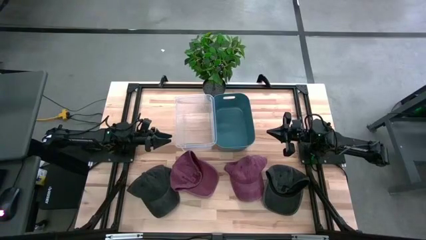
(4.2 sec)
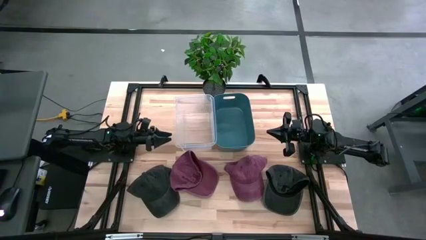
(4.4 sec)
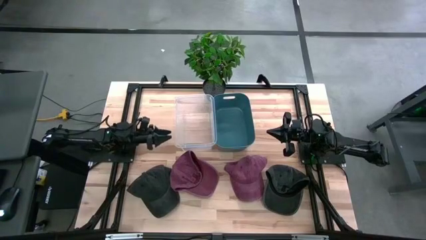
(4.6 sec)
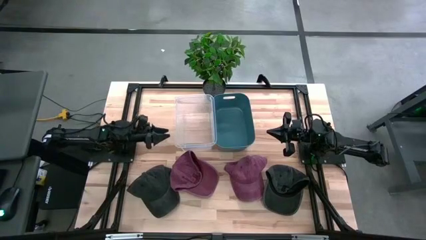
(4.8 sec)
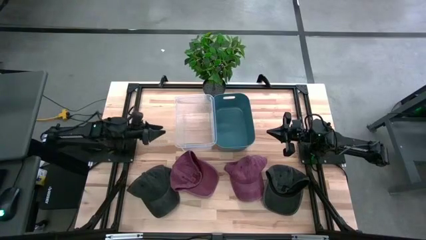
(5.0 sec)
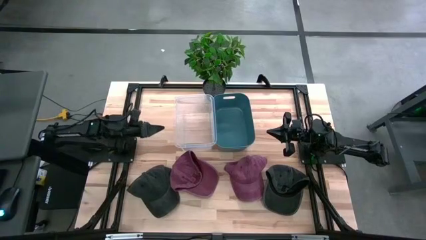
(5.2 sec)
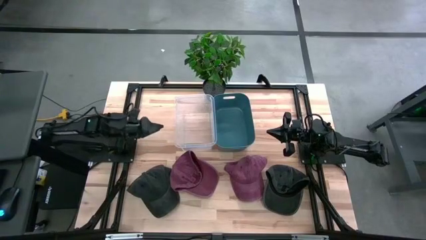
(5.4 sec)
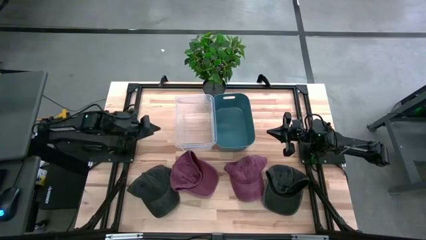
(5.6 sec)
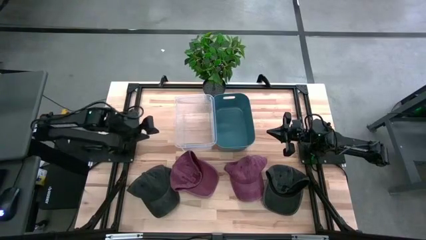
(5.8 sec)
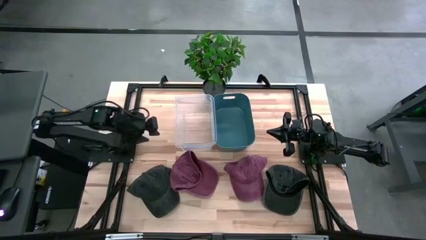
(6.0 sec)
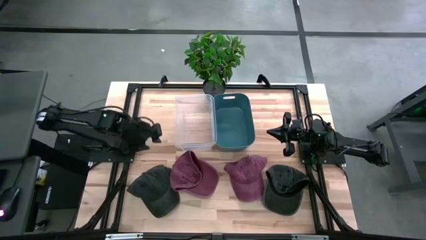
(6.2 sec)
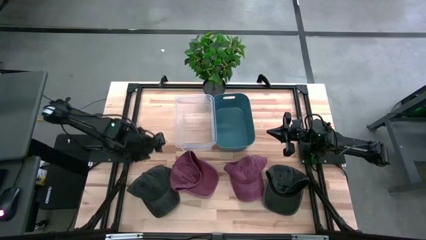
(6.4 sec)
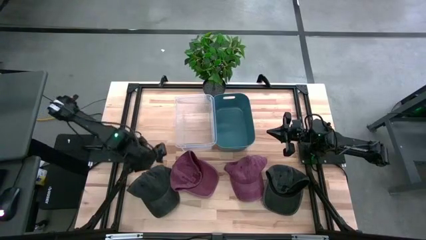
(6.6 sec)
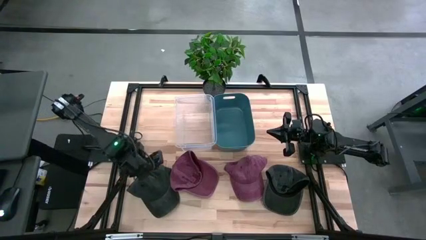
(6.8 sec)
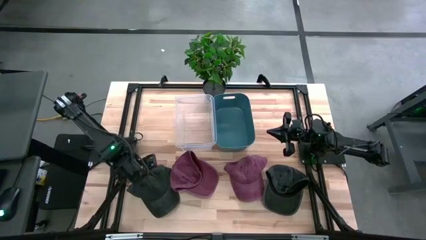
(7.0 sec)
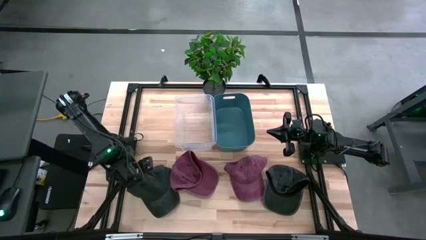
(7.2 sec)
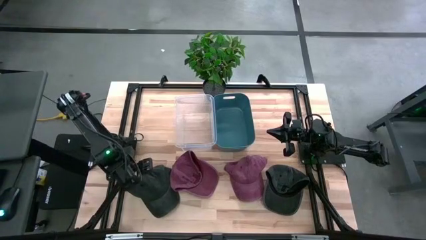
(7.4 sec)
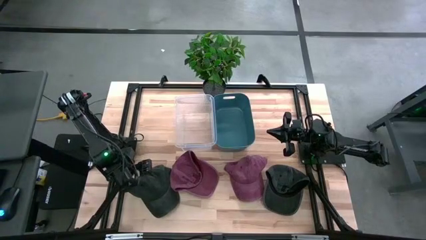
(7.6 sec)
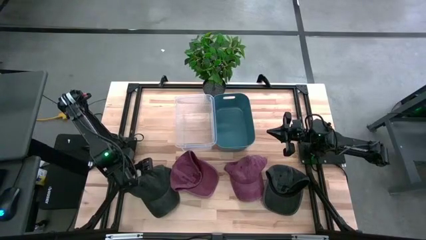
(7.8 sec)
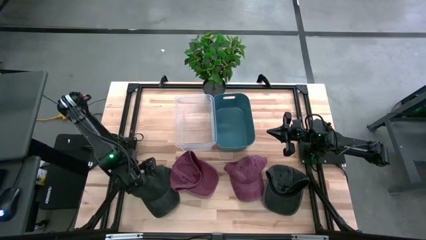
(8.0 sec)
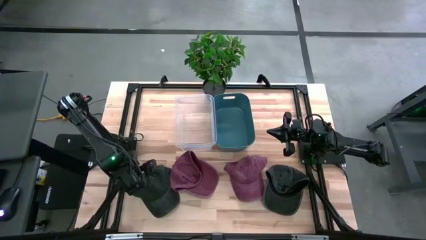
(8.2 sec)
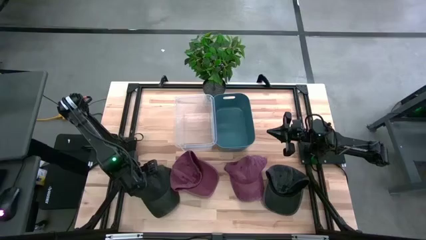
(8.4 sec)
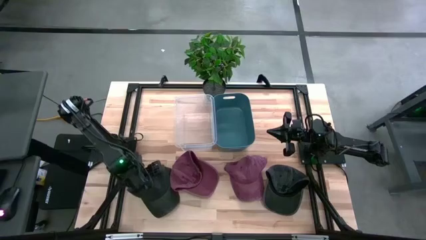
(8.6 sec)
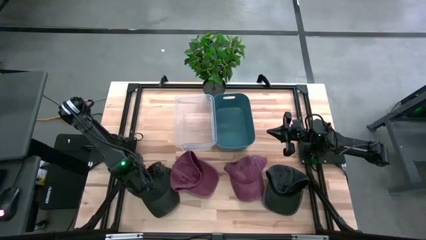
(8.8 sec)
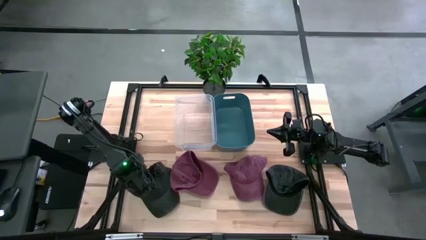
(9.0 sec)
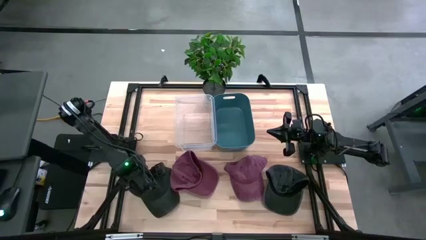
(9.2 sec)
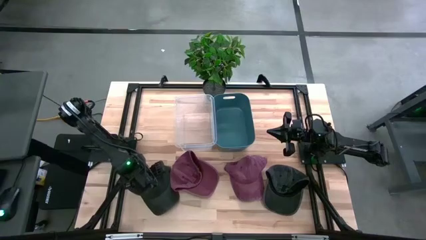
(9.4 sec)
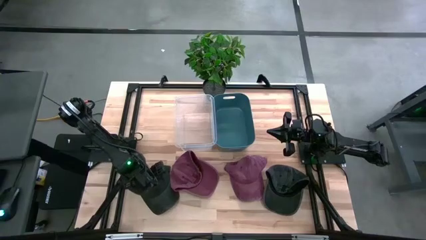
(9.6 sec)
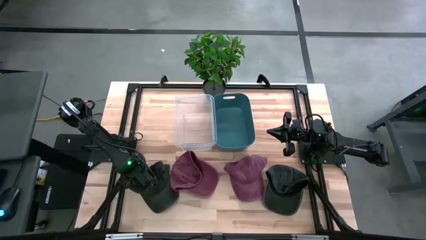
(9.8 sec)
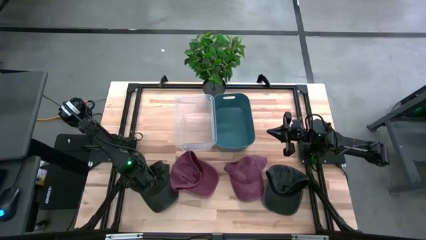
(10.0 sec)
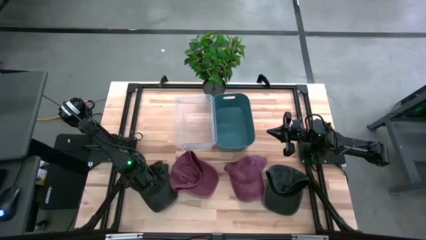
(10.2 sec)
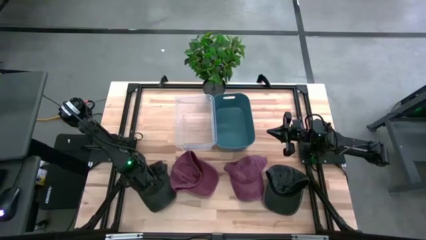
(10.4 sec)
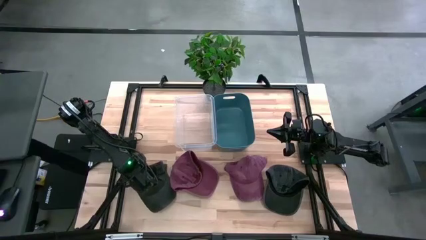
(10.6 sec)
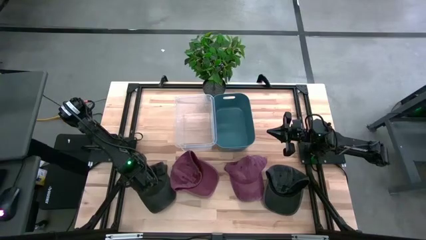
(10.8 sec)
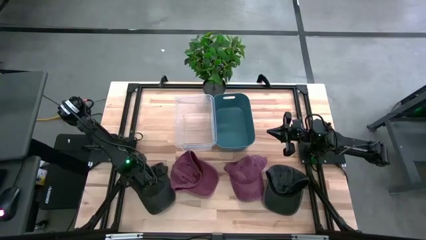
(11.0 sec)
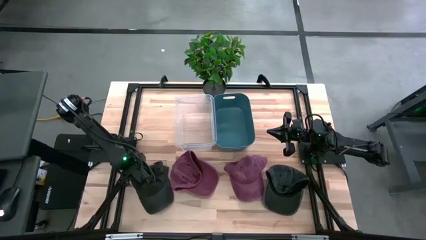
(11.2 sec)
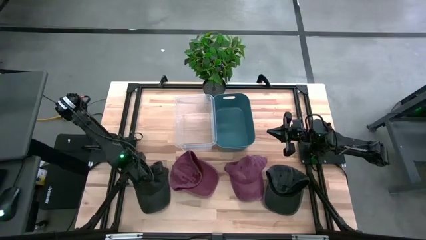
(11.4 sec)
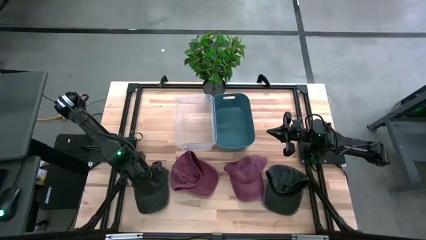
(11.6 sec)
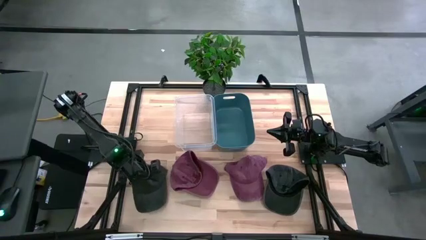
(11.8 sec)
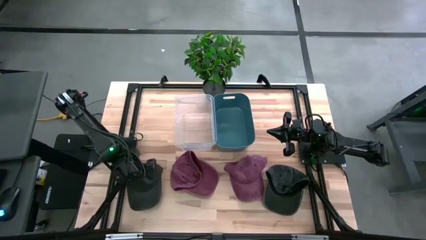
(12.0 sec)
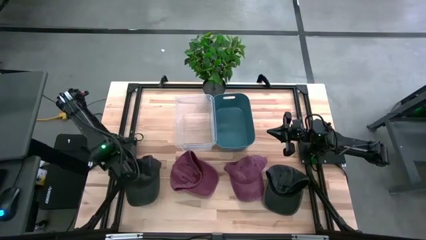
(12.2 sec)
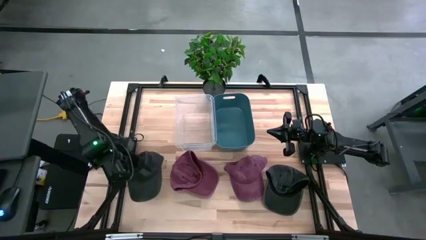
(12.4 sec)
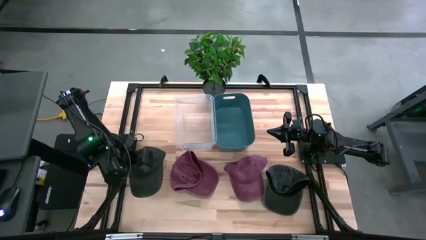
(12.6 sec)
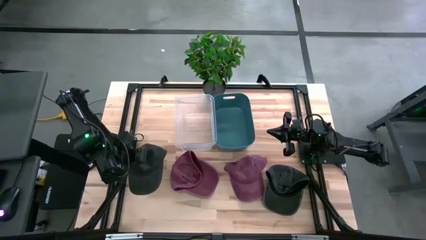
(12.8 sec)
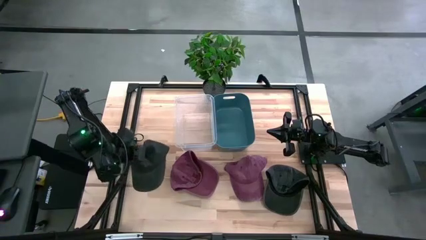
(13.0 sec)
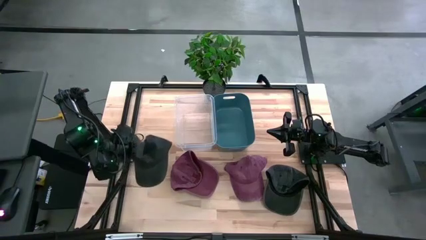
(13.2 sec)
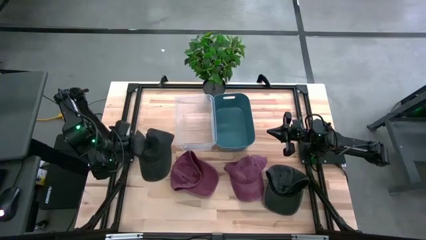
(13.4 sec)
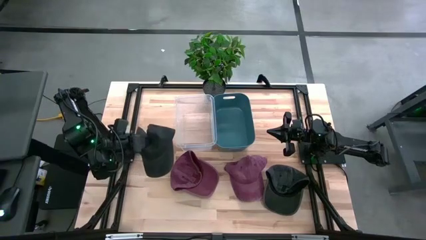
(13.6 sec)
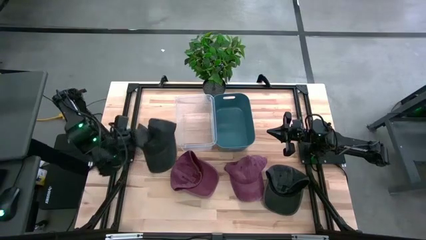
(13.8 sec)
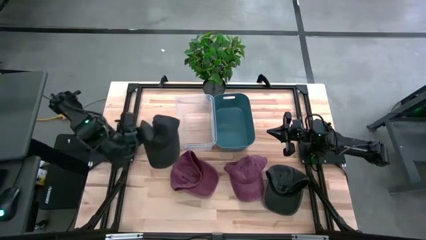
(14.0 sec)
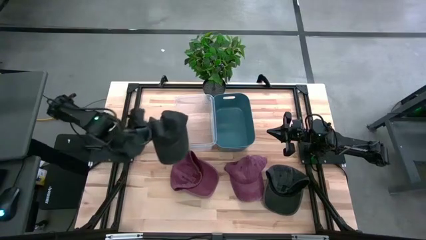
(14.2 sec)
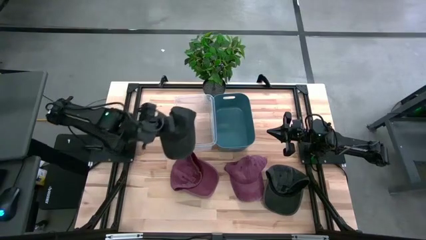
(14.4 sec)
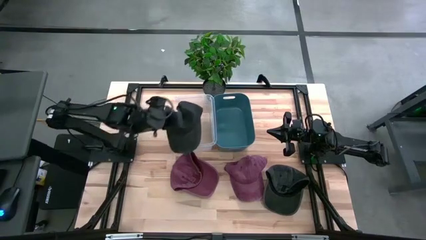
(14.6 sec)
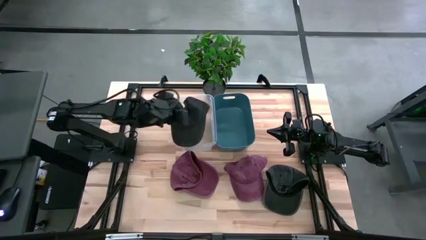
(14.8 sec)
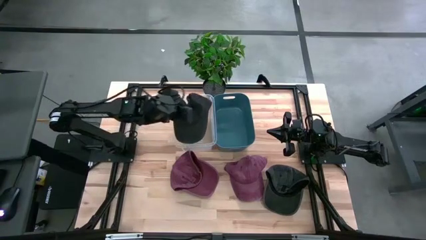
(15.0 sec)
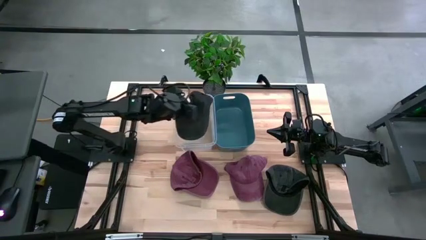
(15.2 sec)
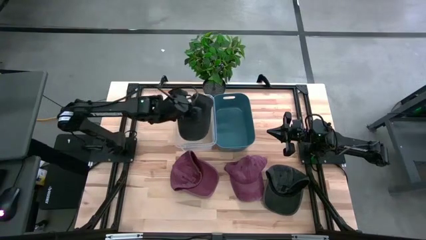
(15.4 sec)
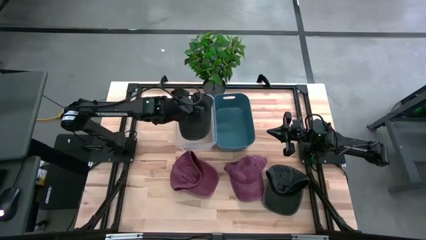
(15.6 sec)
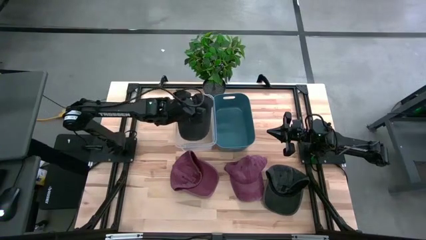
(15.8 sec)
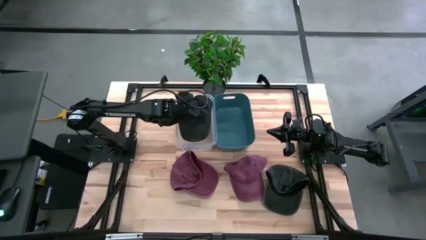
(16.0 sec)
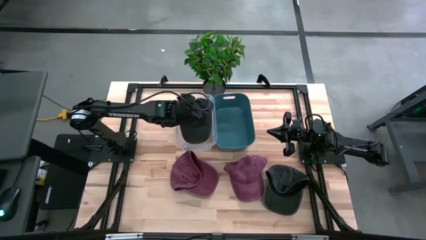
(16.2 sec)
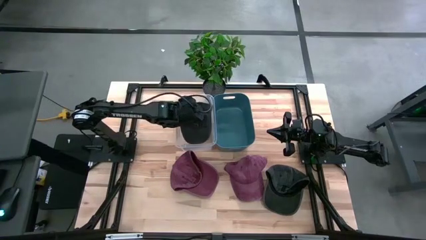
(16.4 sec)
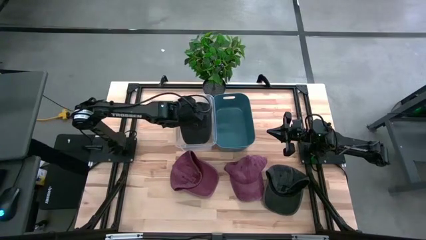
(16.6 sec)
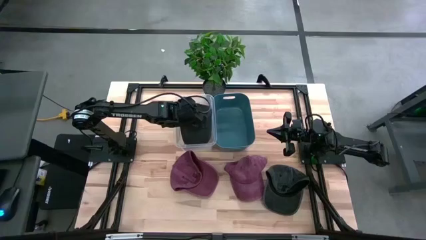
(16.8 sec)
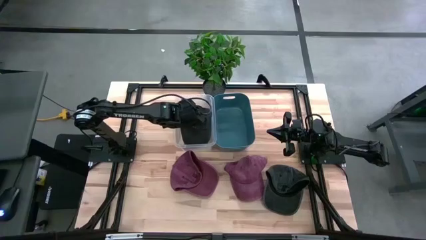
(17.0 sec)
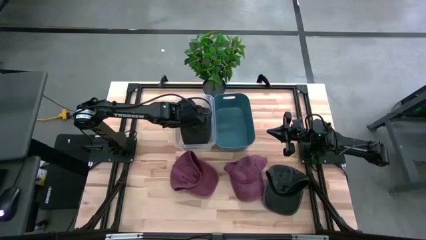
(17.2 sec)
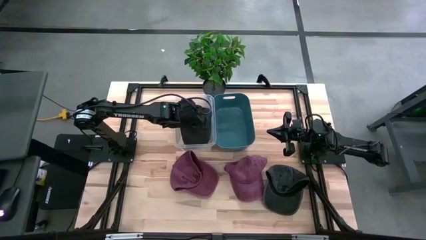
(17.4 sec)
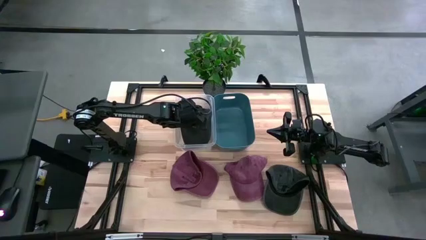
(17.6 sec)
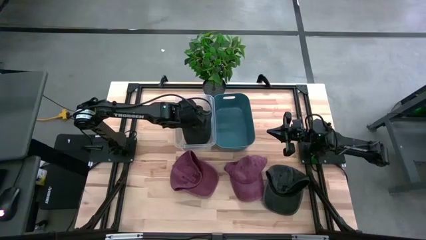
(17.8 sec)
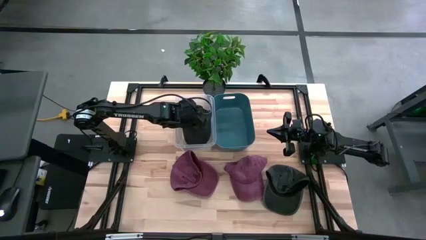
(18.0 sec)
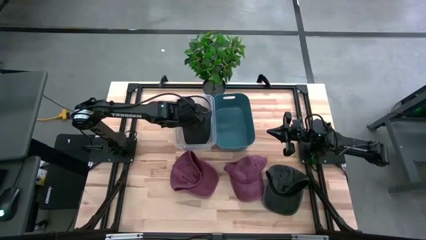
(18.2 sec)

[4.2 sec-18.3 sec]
Task: Pick & Place hat
Put the left black cap into the transparent bin
